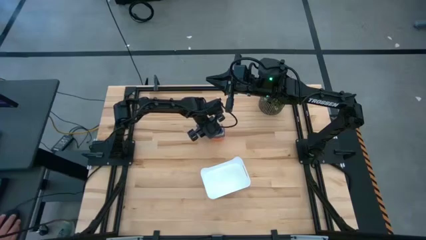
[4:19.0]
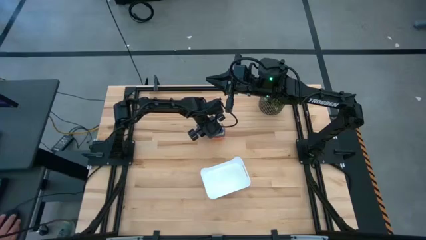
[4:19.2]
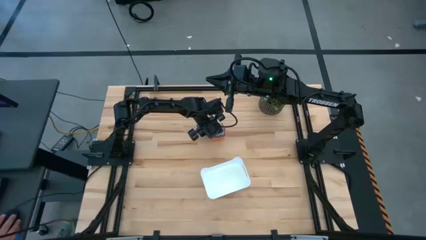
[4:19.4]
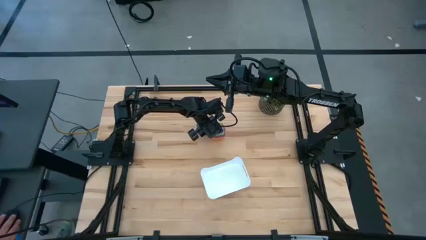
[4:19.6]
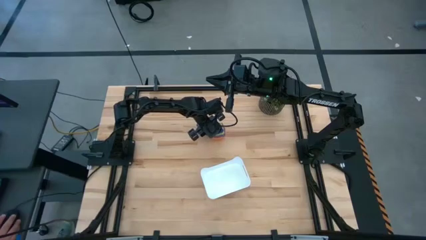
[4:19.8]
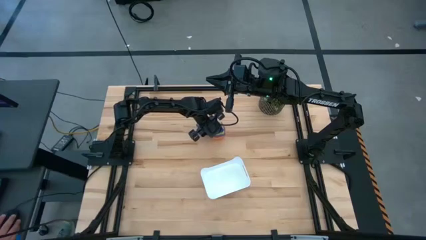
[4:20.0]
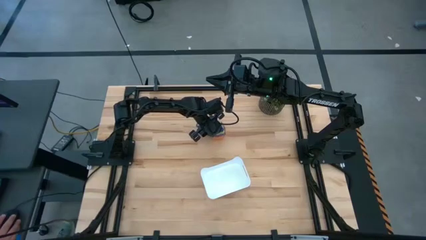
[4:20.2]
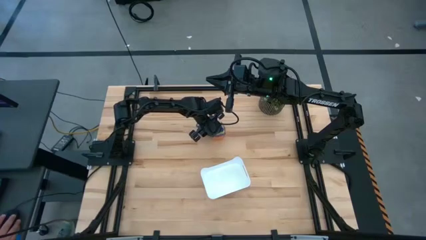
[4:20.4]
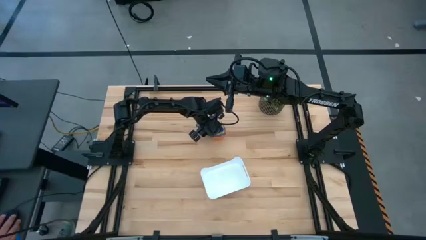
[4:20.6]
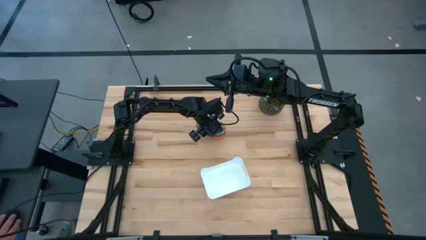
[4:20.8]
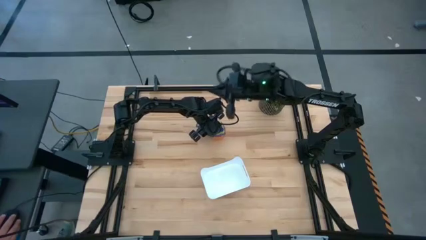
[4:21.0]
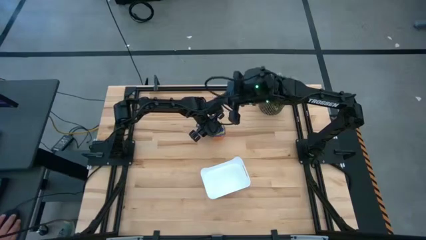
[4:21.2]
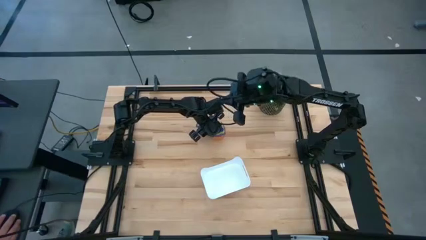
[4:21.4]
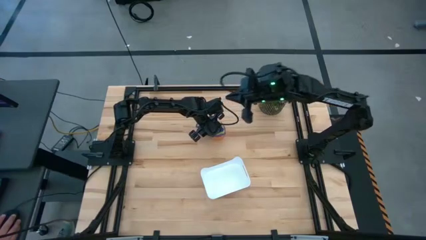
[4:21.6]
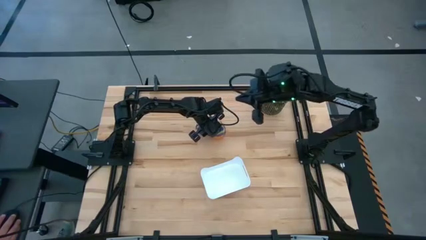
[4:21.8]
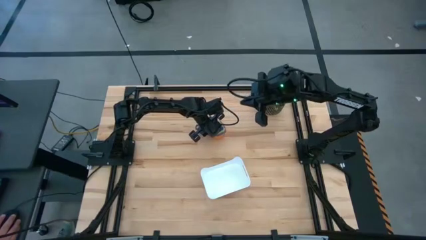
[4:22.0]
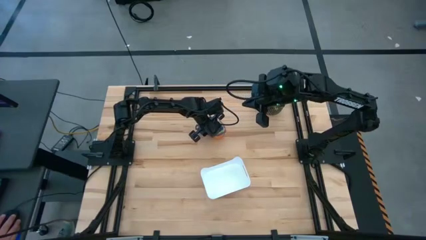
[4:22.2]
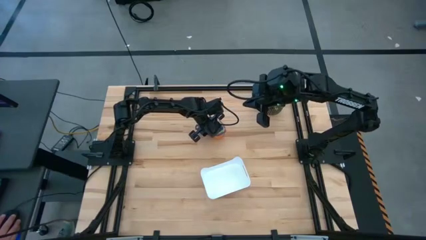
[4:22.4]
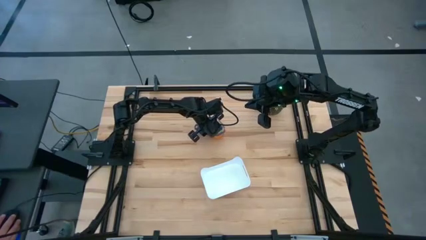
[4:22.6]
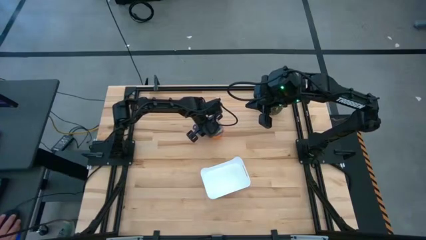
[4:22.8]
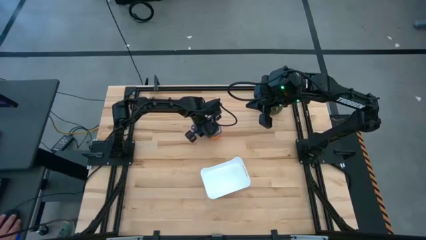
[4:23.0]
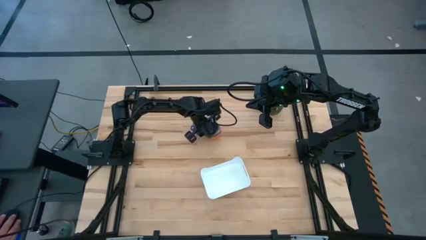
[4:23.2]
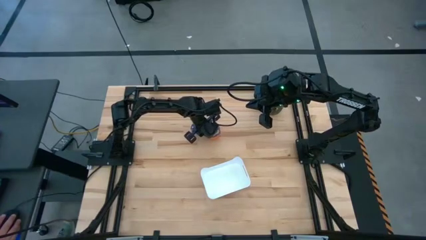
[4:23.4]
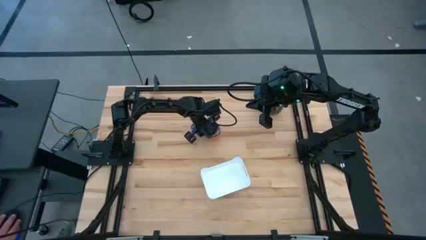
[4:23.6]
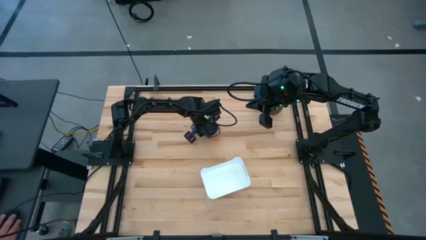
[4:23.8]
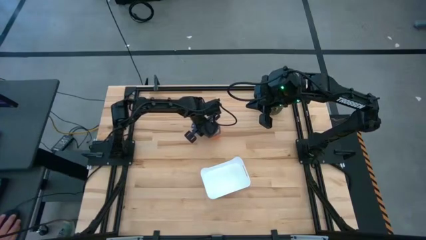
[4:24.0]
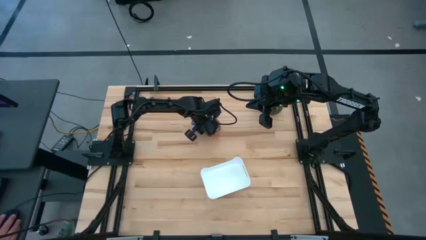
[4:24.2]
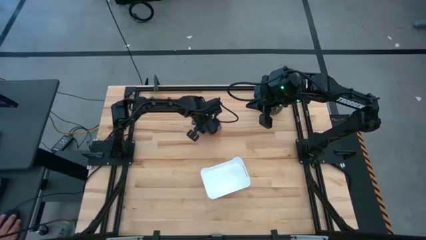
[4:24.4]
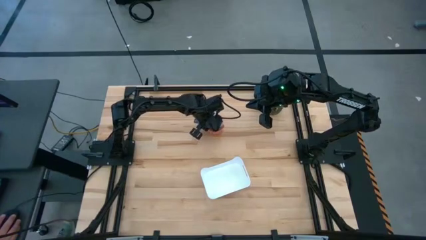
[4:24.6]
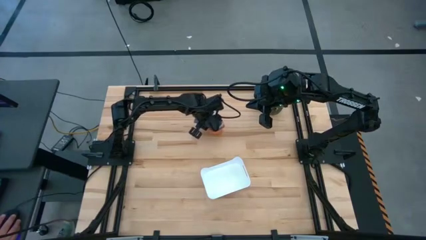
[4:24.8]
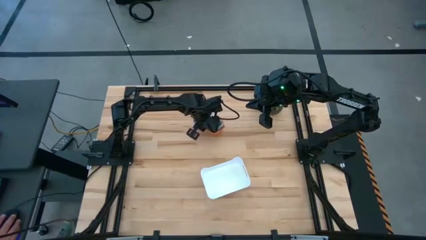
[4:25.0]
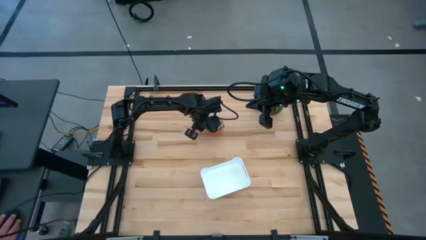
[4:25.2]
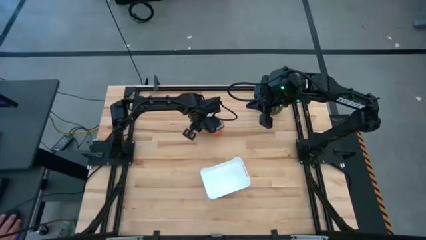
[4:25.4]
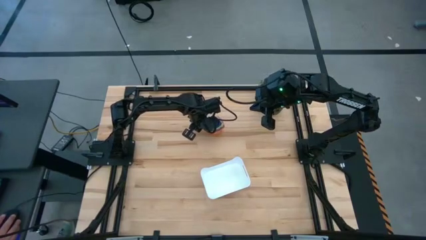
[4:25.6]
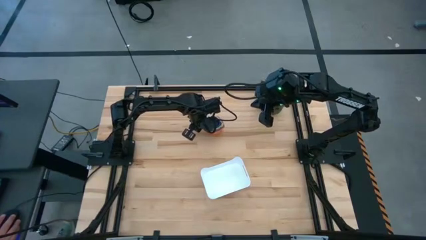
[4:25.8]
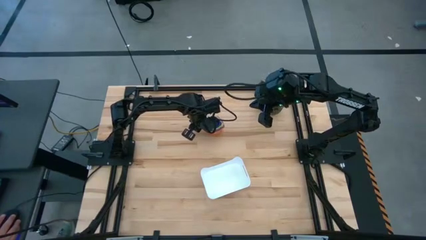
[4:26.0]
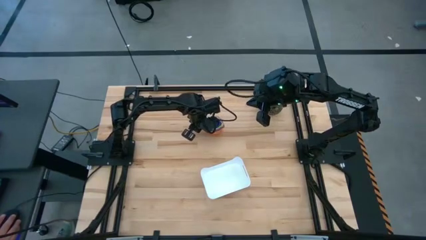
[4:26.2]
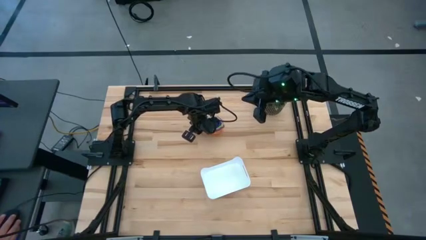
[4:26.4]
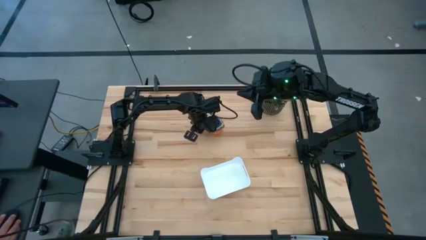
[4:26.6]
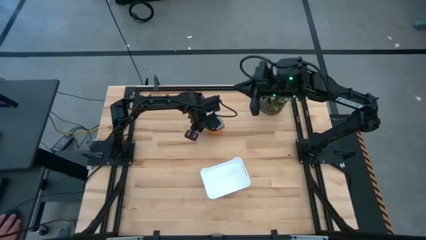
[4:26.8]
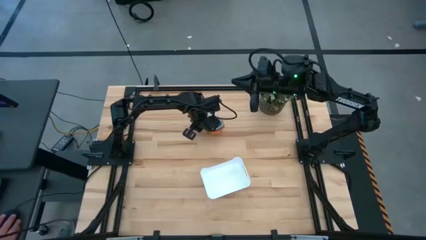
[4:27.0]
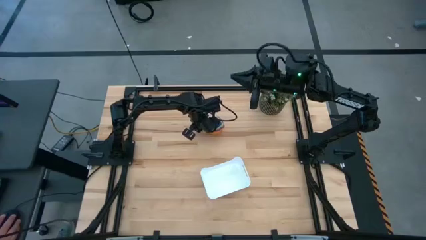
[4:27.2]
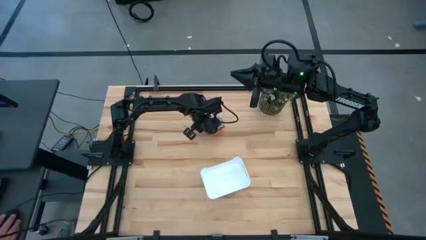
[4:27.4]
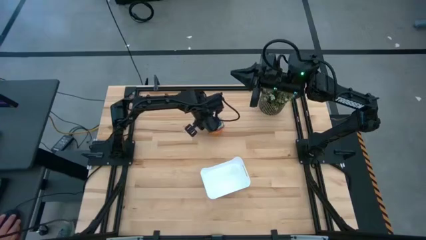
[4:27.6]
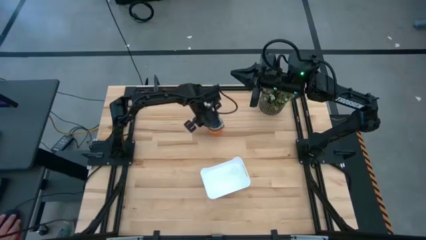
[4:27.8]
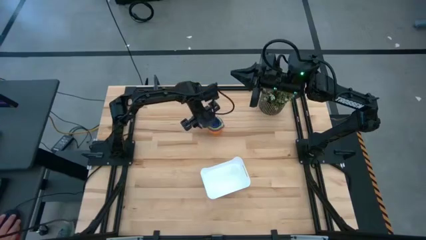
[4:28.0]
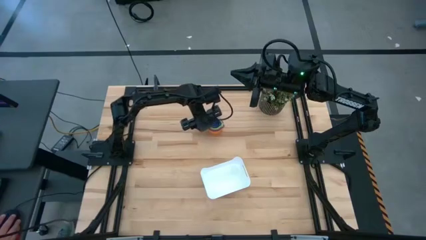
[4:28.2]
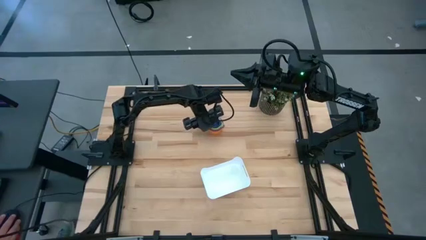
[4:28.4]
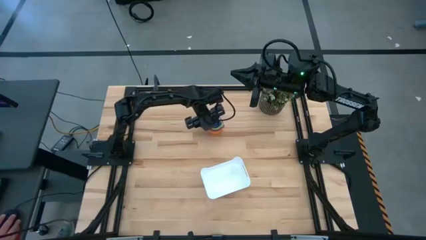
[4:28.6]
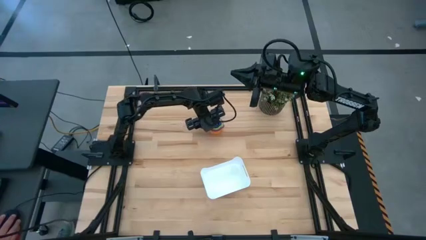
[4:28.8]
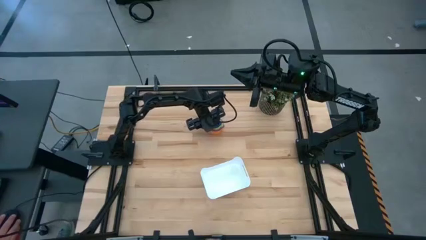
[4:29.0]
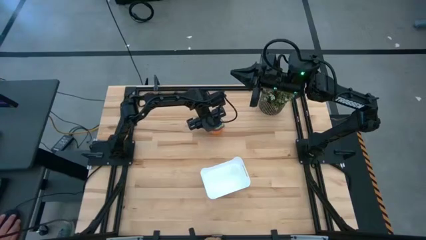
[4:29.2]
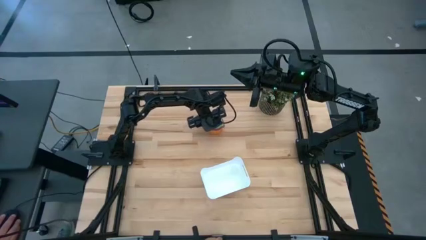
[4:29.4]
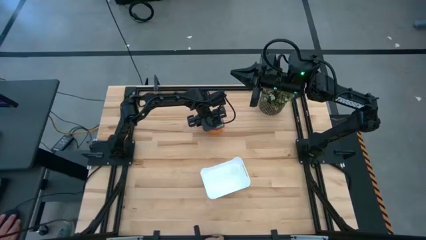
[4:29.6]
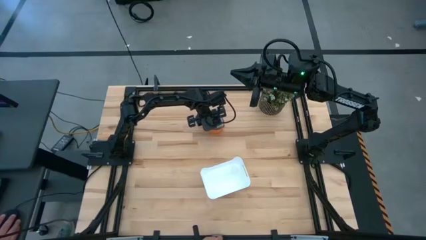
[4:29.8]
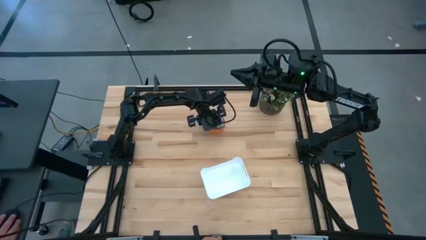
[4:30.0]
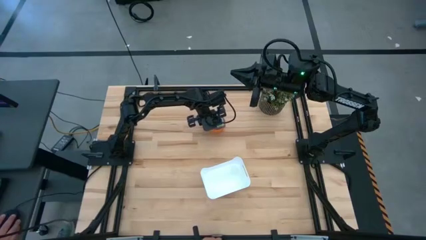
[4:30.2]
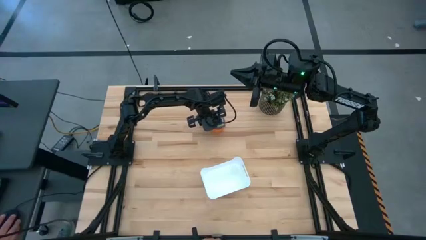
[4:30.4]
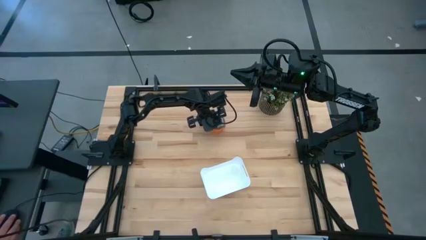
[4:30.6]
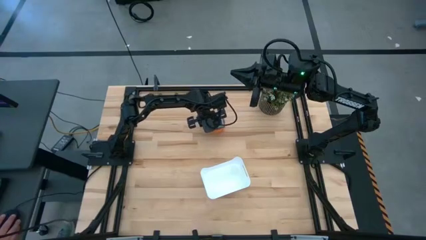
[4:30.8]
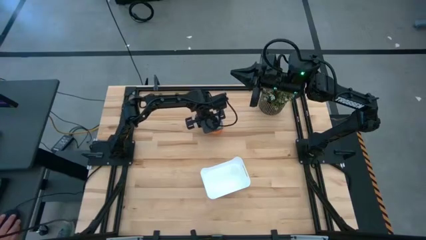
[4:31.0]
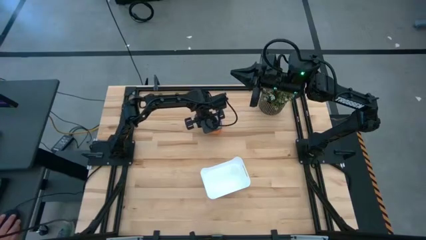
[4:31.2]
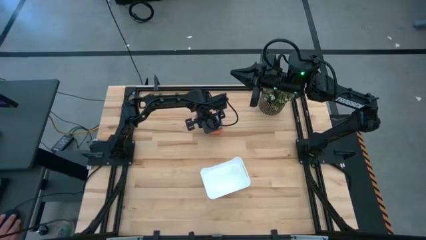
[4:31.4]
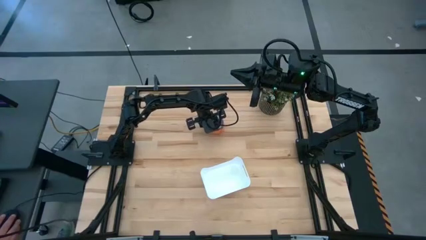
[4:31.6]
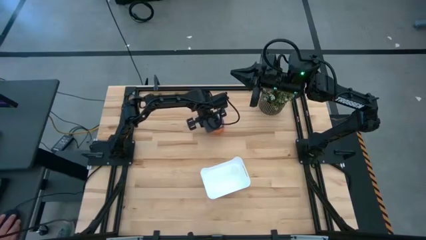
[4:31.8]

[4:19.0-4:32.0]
Task: Nest measuring cups in basket
Put the nested measuring cups into the white bin

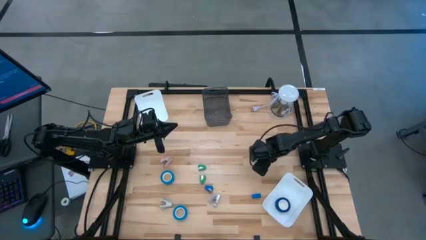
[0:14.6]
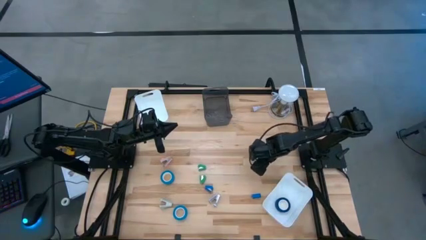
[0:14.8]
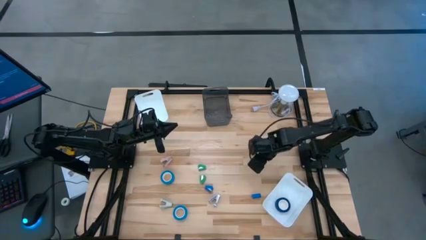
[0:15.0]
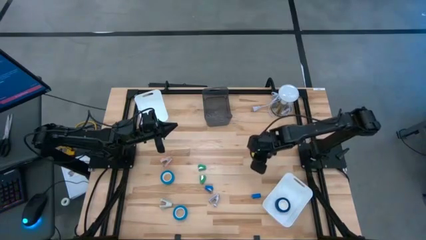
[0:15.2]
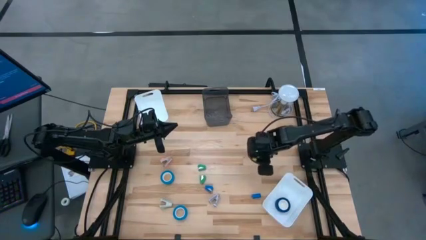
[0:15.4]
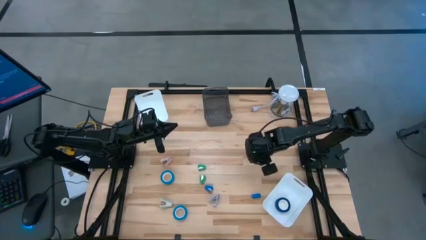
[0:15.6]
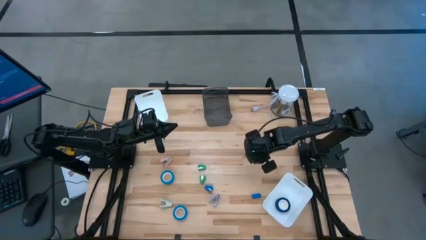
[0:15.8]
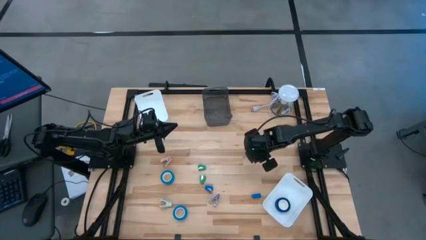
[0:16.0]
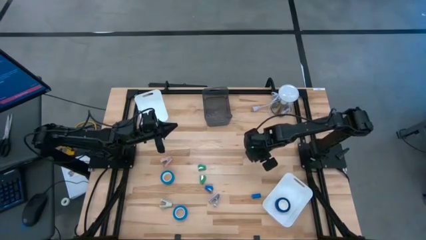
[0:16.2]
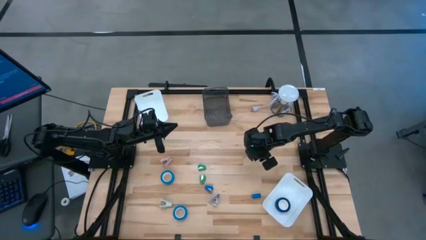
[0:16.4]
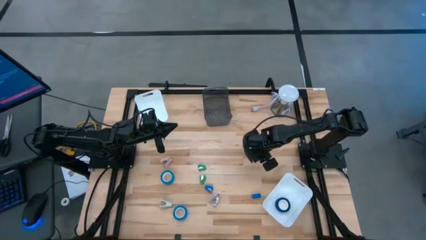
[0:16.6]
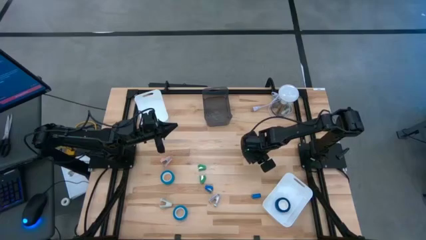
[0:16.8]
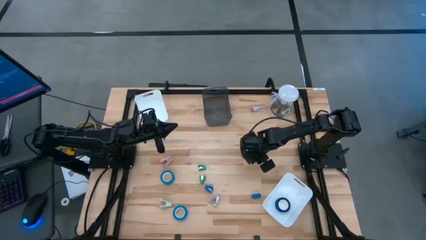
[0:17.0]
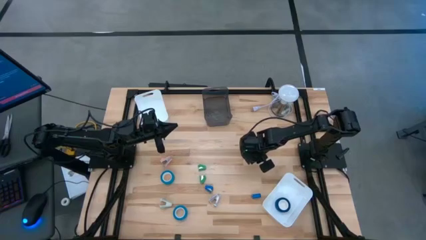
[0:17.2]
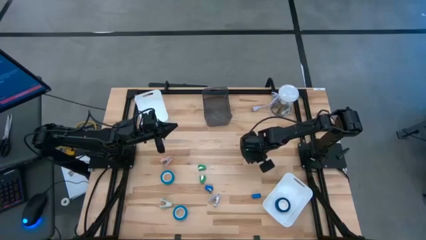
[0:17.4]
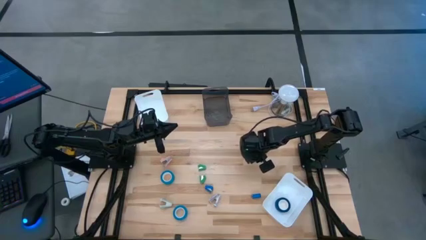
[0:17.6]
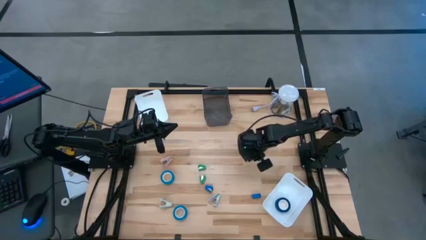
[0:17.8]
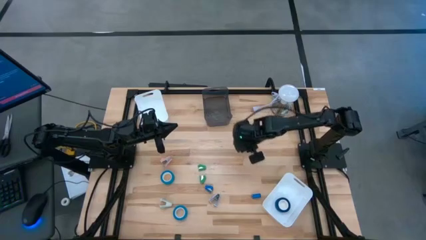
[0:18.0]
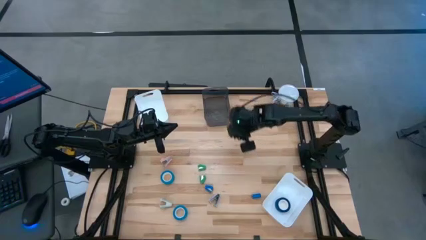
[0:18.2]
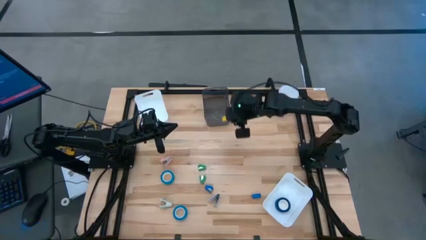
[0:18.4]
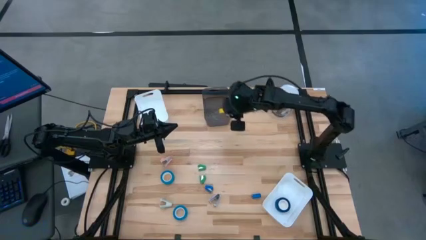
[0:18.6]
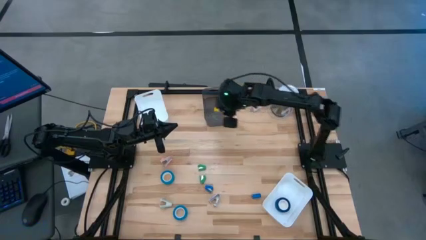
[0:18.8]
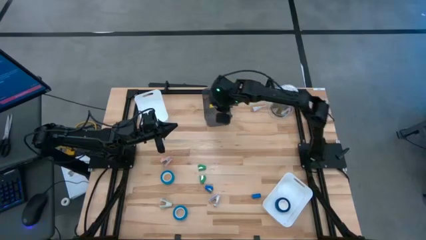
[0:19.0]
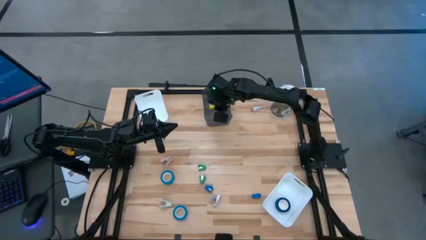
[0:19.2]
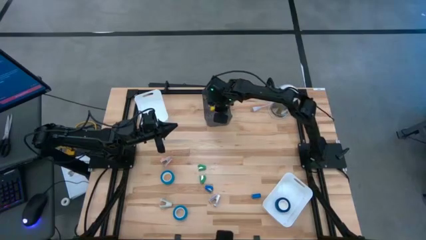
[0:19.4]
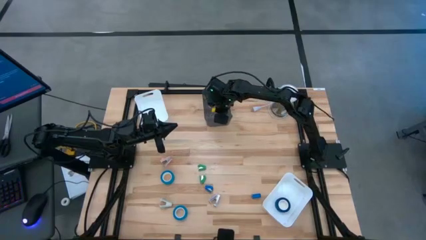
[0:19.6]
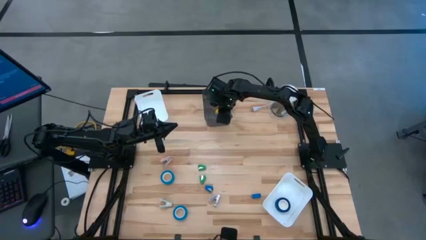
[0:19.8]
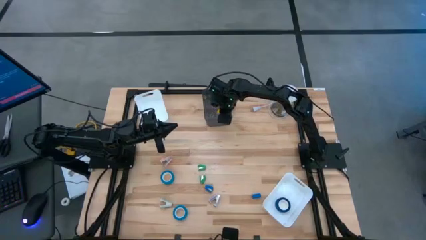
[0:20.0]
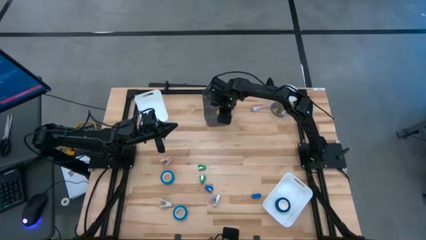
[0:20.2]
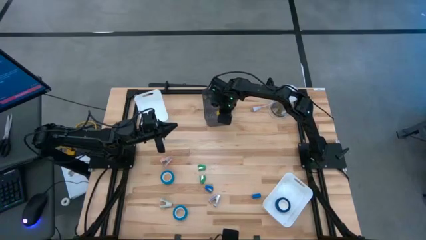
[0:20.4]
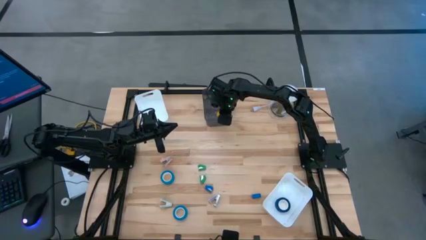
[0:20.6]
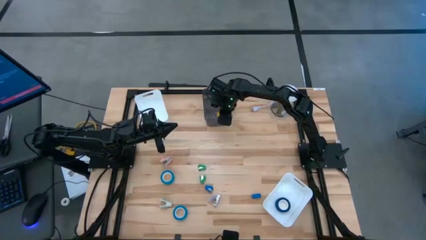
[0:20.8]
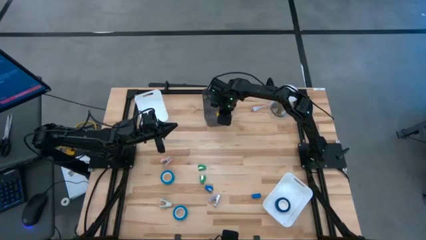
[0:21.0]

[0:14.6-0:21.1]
Task: Pick and place Stapler, Stapler remover, tape
Put the yellow stapler into the black bin
